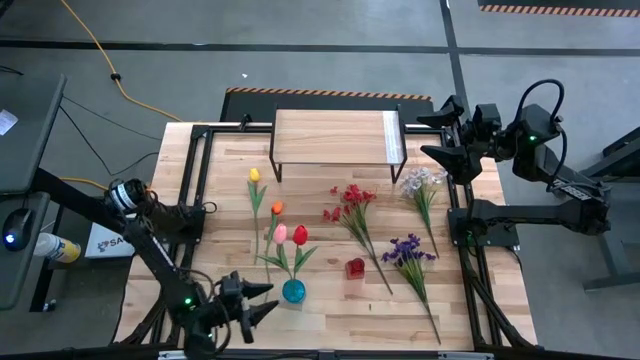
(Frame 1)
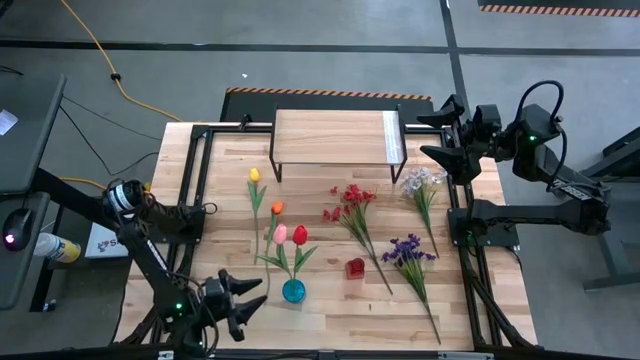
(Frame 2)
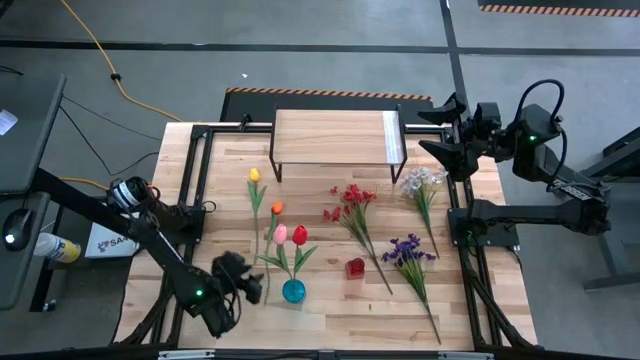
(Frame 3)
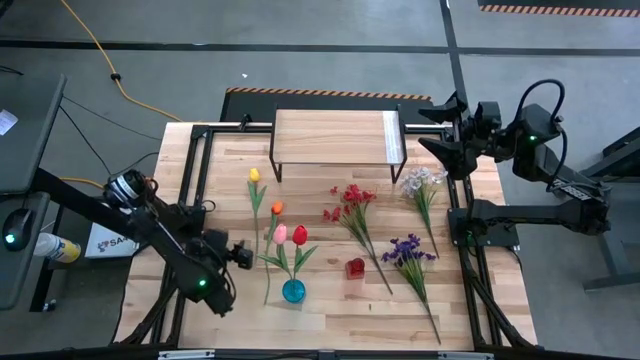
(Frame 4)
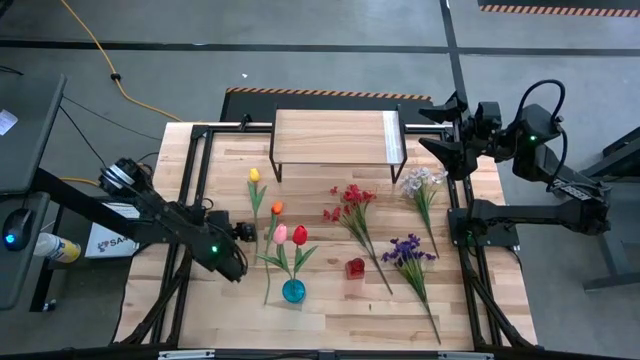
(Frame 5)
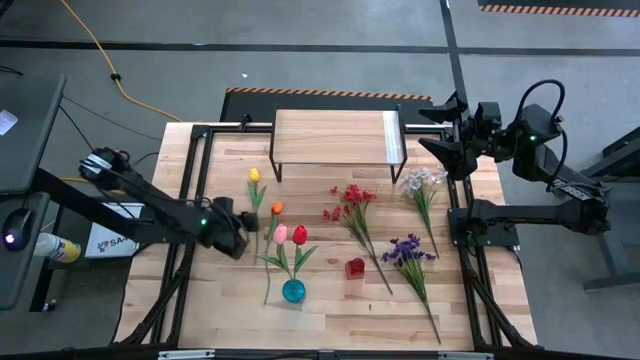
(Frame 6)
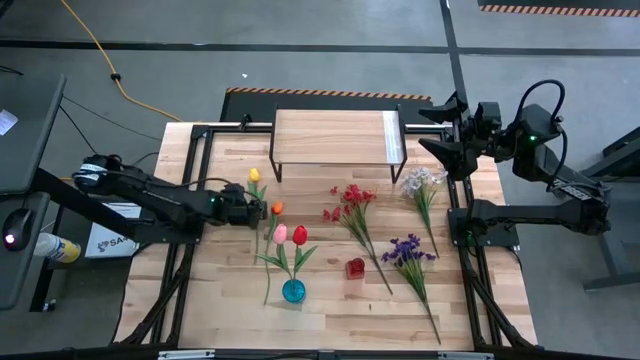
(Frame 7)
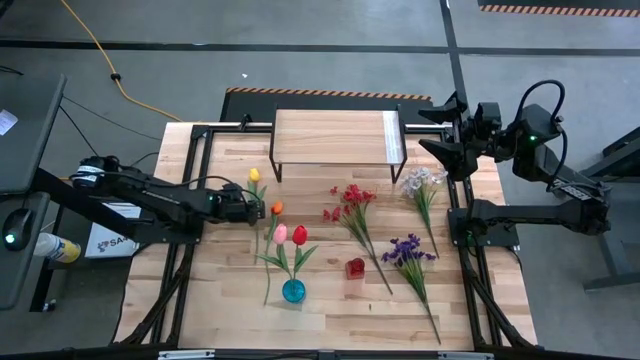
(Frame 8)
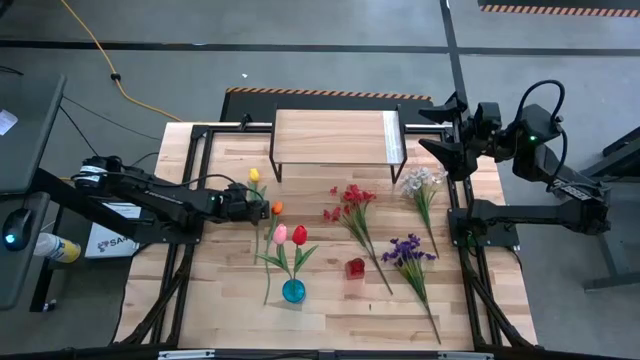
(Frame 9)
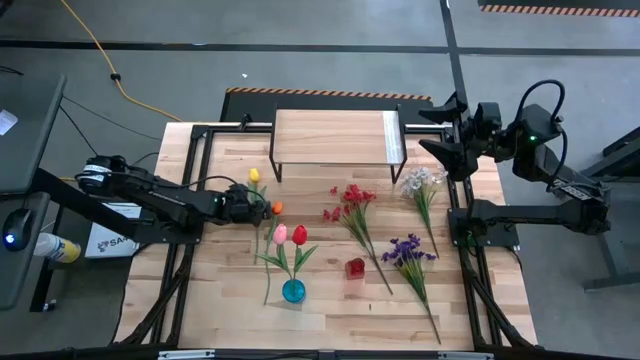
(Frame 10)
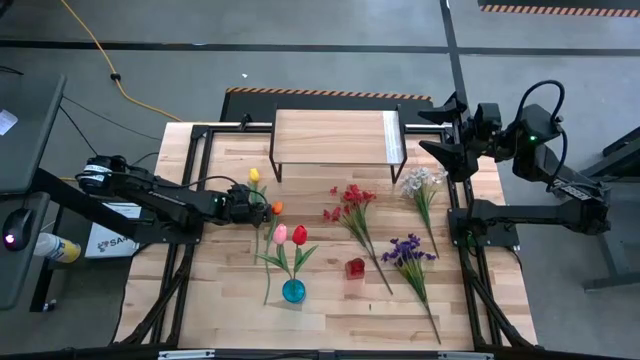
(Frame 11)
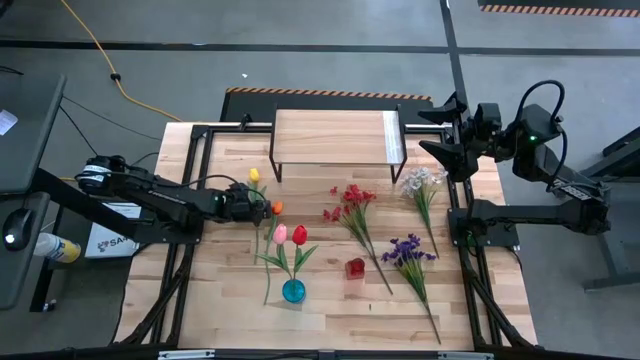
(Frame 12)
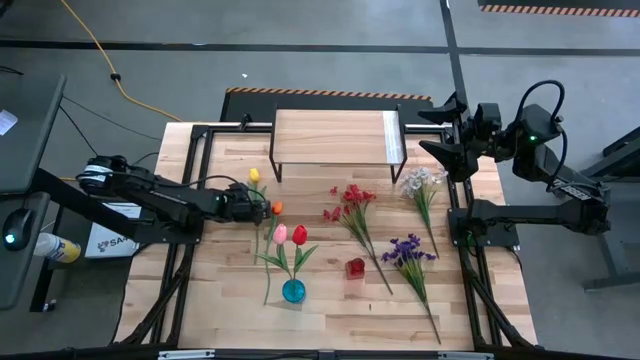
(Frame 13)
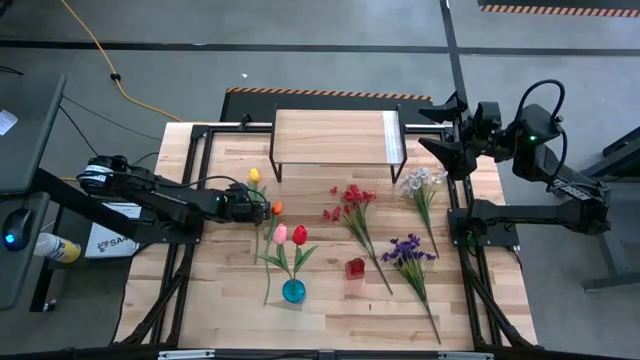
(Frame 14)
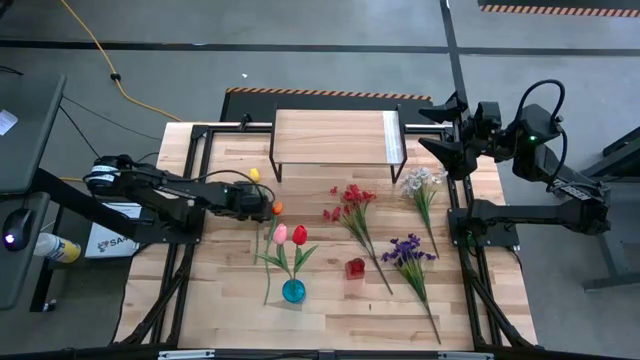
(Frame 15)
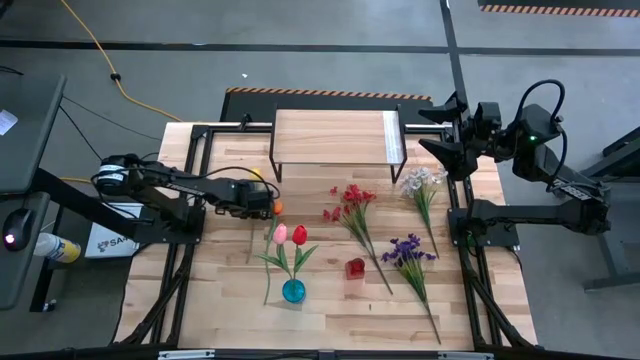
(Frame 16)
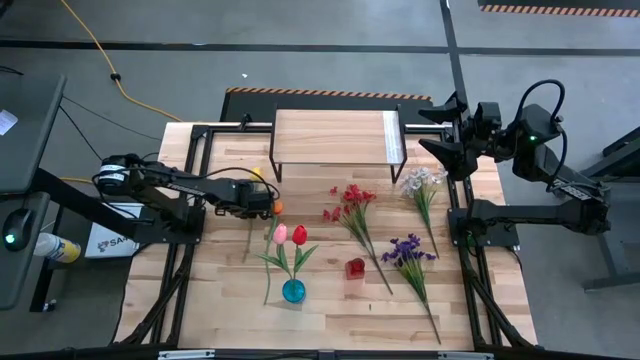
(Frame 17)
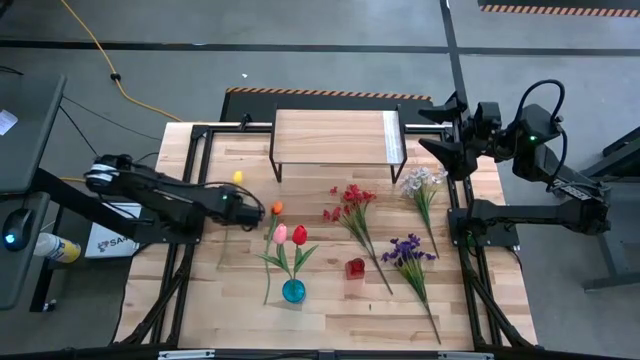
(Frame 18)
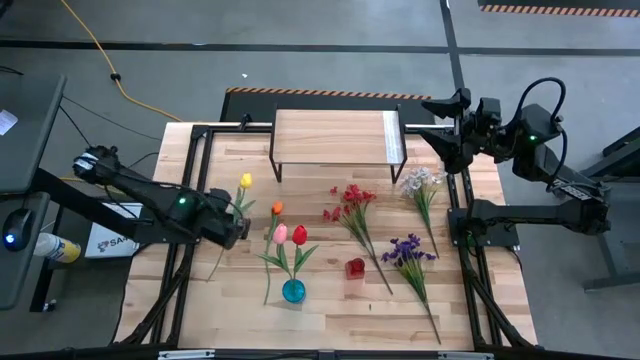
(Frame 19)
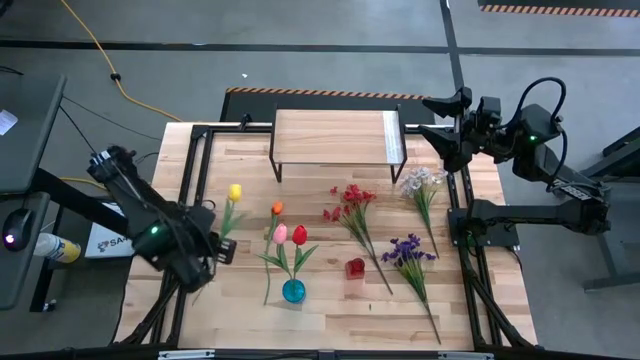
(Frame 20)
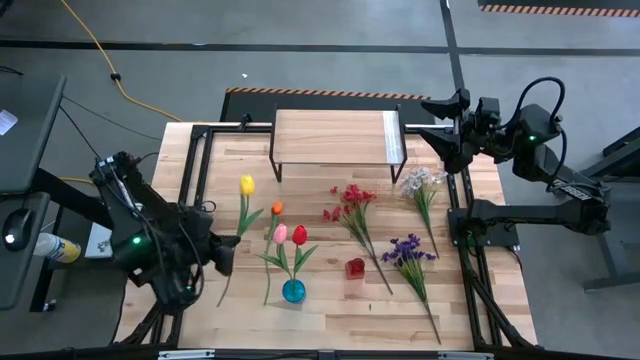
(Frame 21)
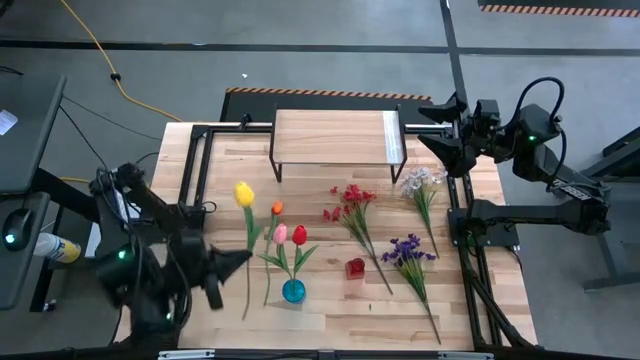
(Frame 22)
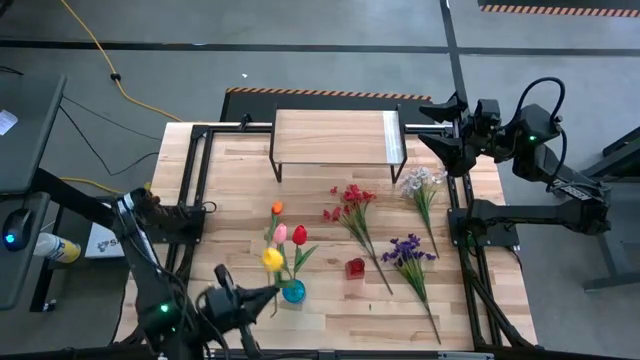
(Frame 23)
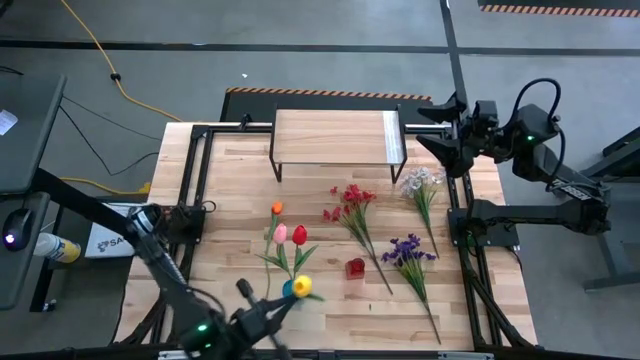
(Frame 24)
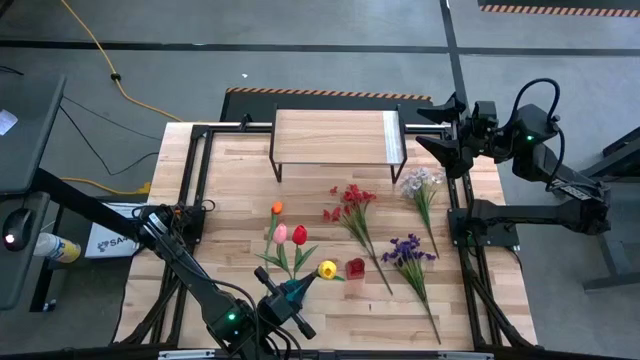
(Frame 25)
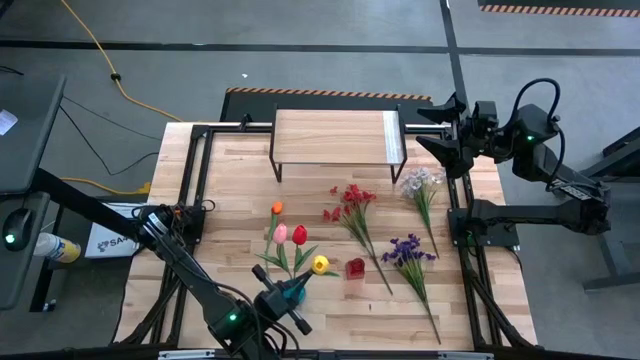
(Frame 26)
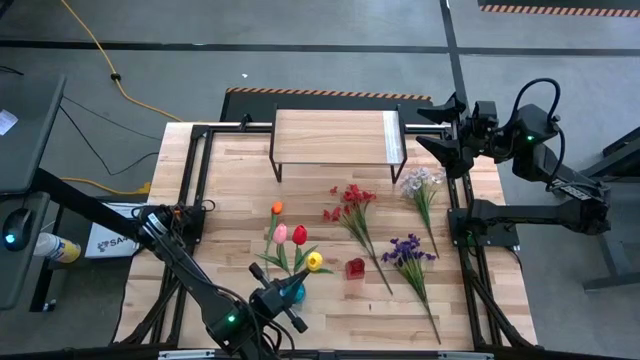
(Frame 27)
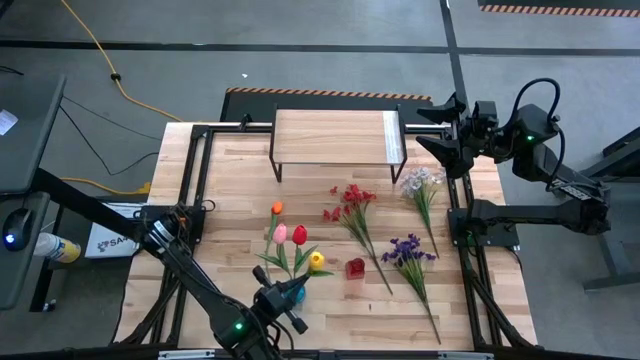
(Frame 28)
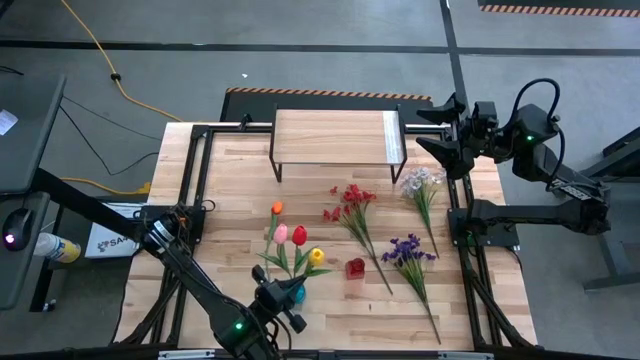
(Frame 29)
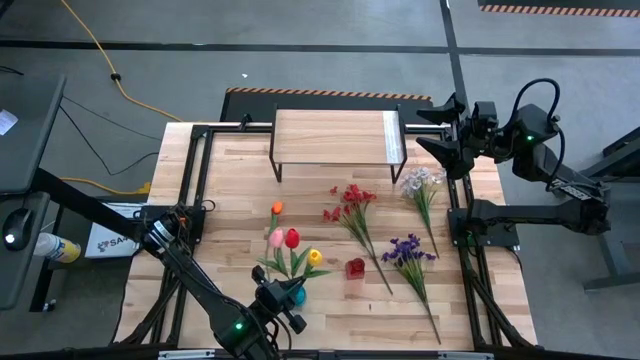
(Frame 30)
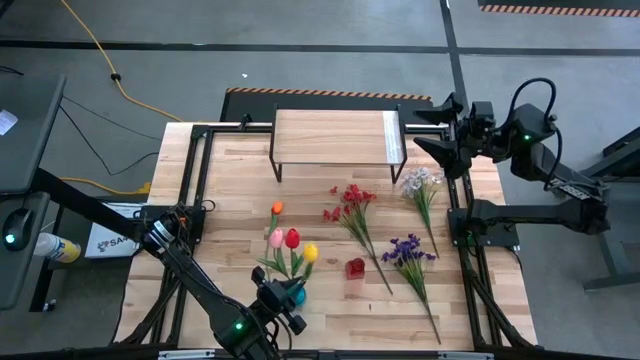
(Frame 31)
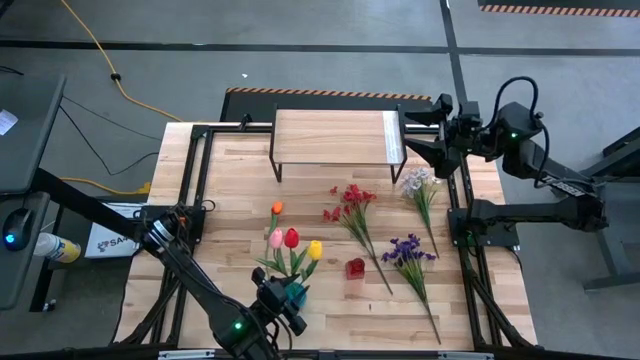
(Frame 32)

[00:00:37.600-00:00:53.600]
Task: Pick and place flowers into a vace then onto a shelf
Put the yellow tulip into the blue transparent vase

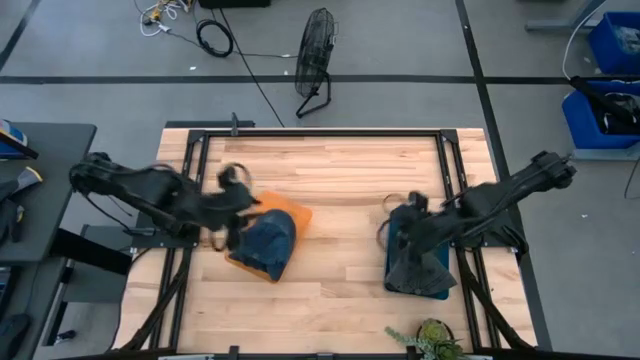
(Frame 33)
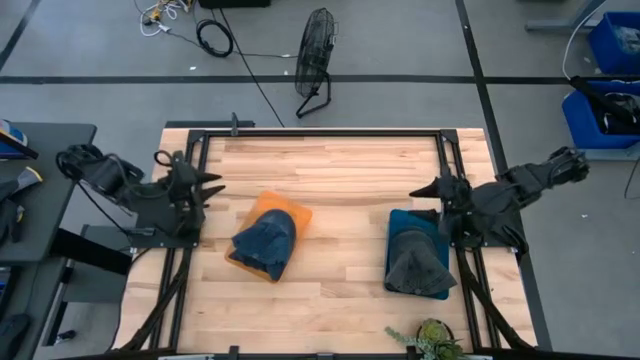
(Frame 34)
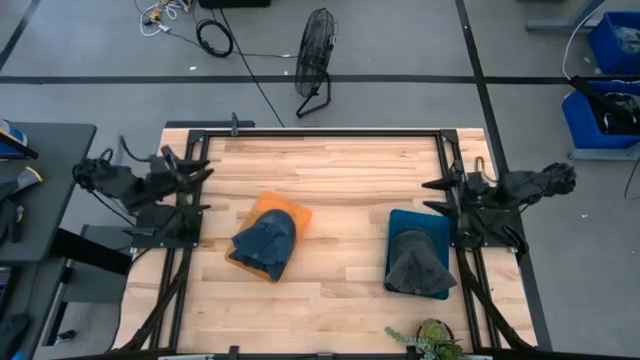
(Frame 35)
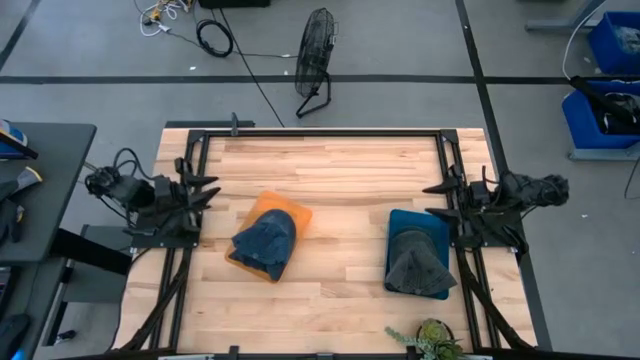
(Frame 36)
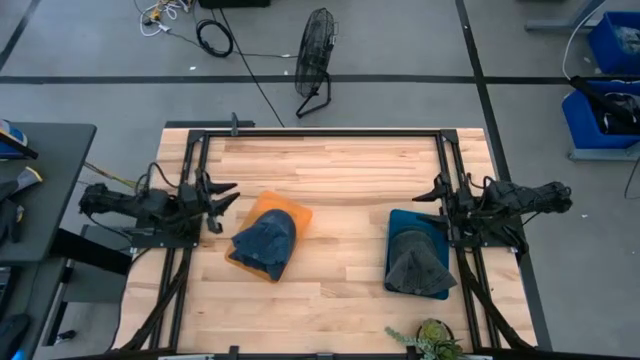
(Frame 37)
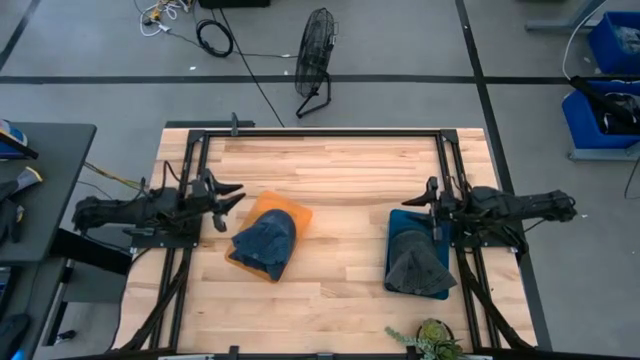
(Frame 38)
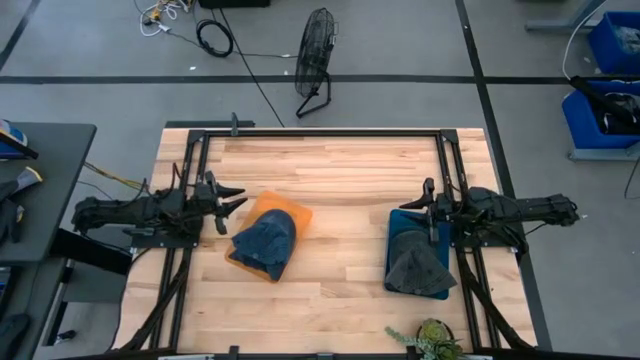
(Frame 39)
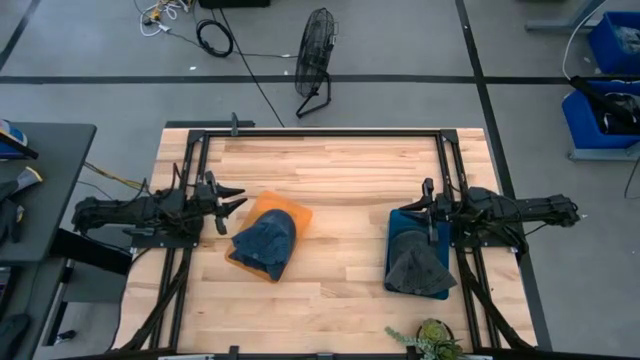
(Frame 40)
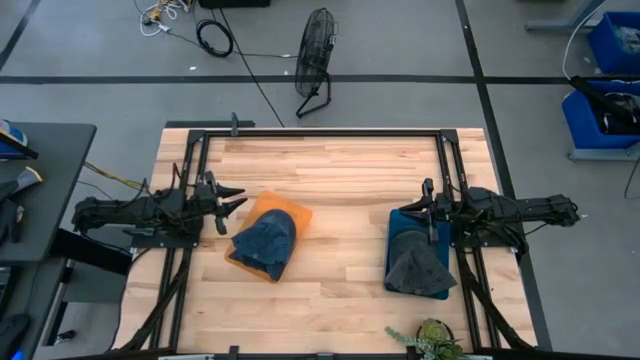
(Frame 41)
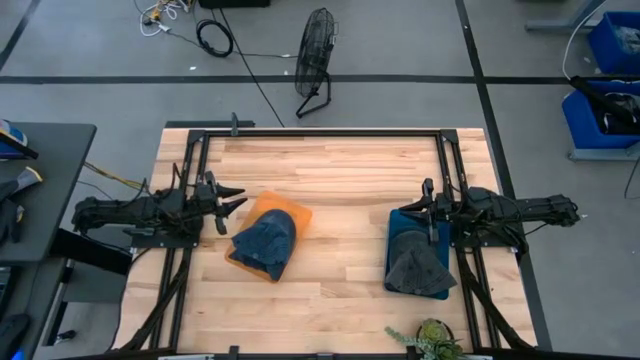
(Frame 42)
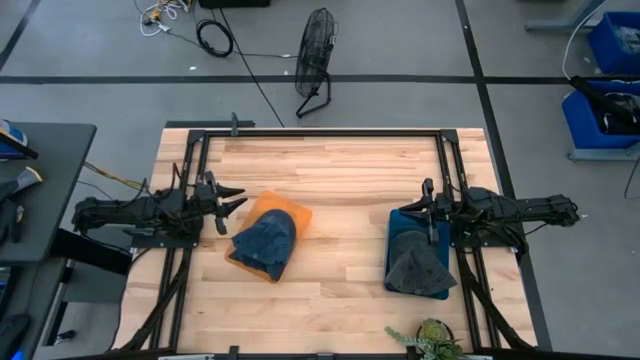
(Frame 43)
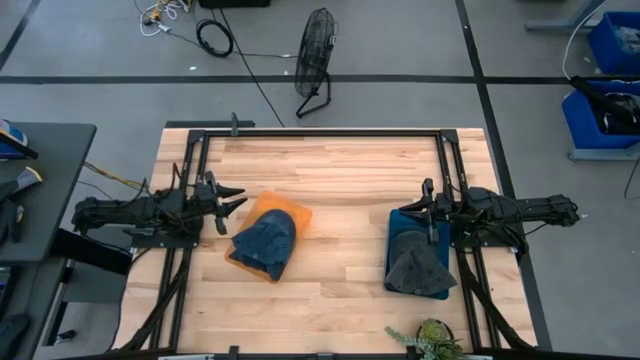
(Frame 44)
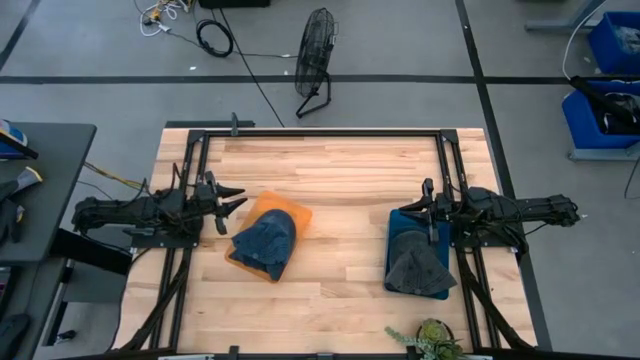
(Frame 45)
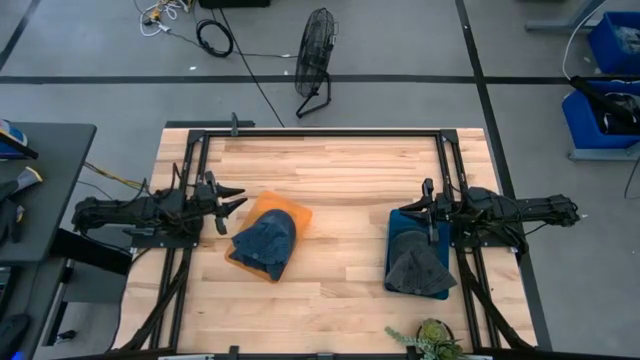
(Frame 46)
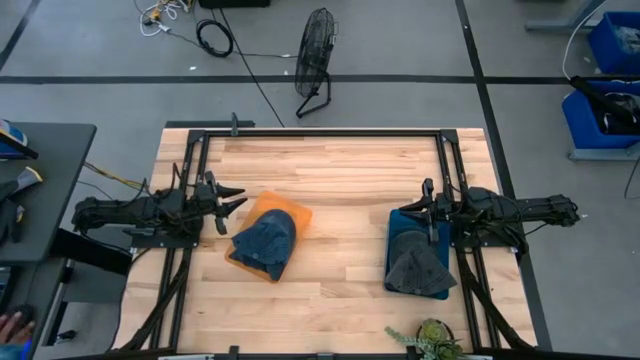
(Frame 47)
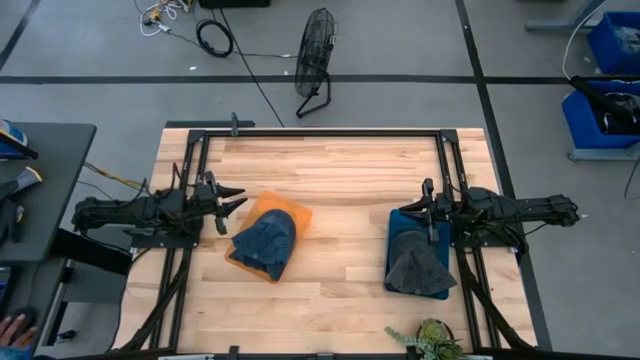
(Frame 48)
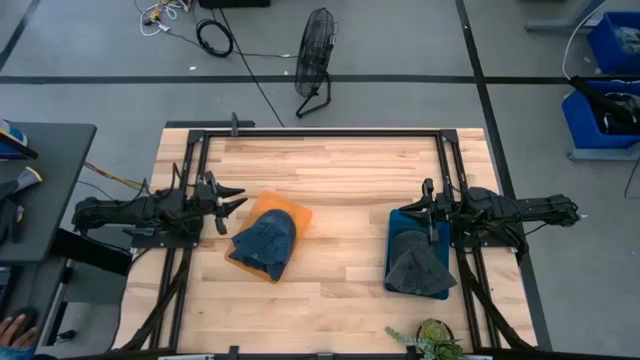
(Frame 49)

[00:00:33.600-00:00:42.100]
Task: Pick & Place hat
Return to Home Position
